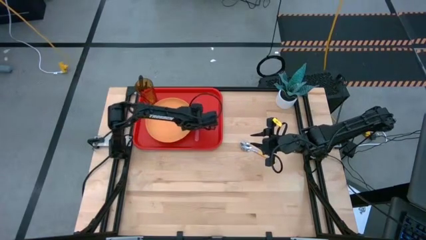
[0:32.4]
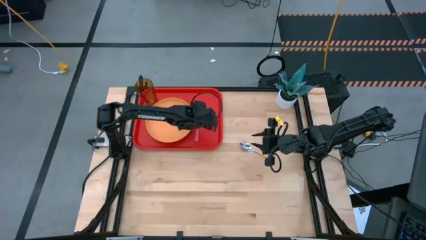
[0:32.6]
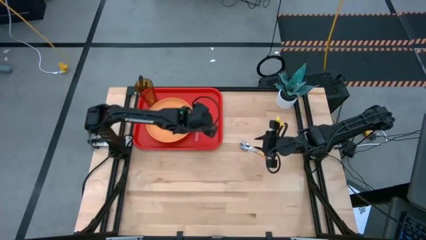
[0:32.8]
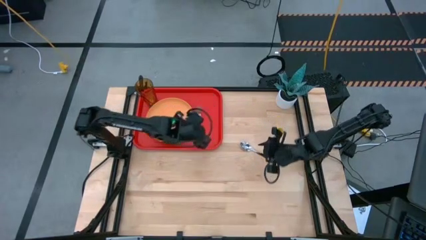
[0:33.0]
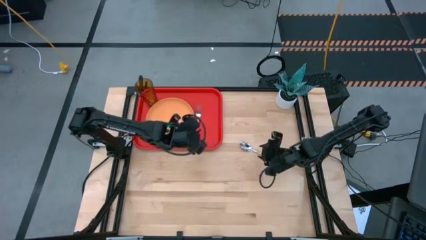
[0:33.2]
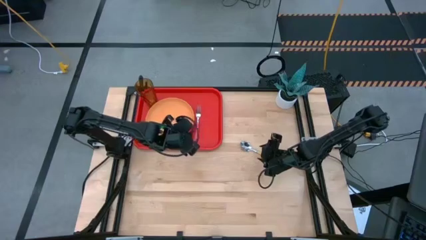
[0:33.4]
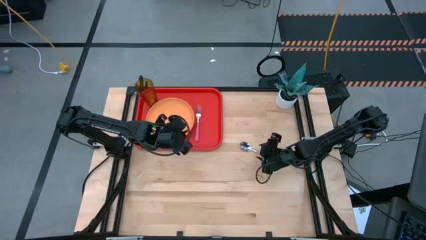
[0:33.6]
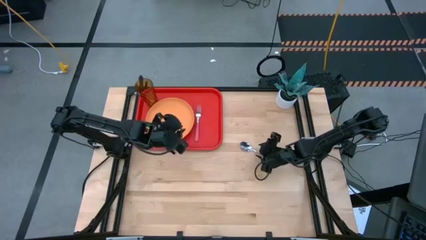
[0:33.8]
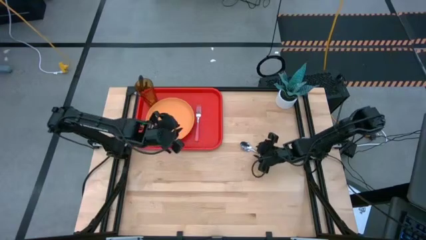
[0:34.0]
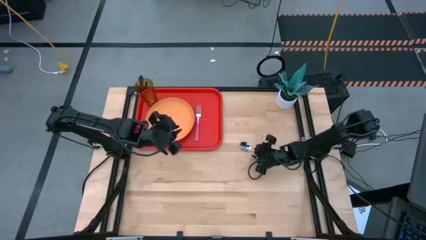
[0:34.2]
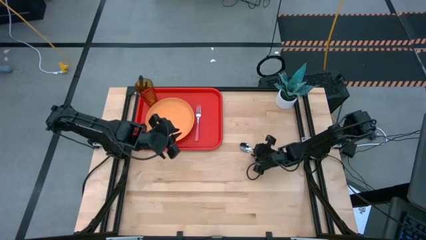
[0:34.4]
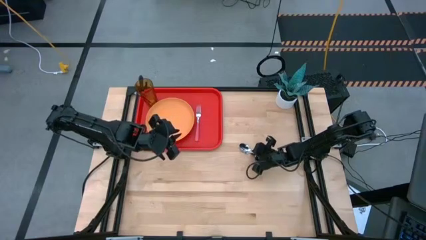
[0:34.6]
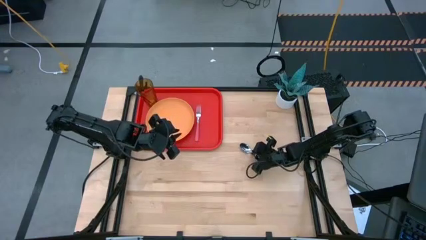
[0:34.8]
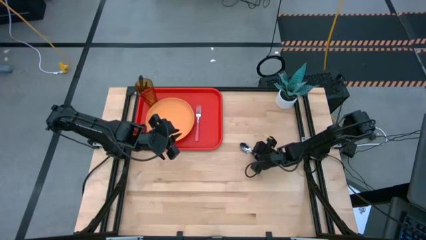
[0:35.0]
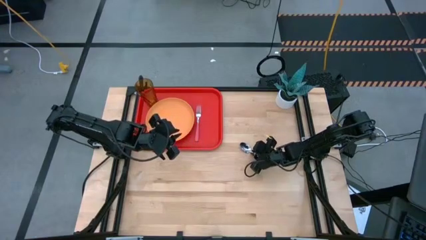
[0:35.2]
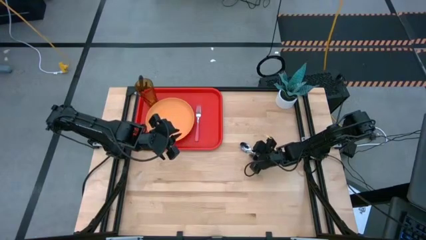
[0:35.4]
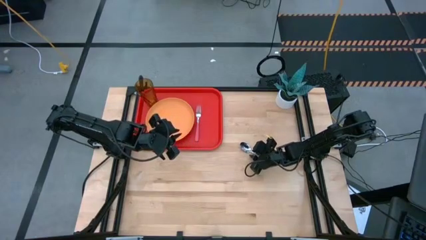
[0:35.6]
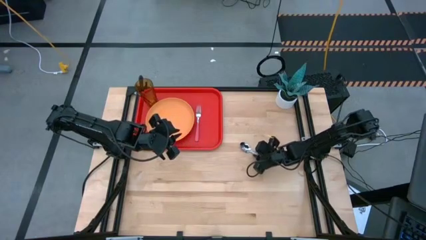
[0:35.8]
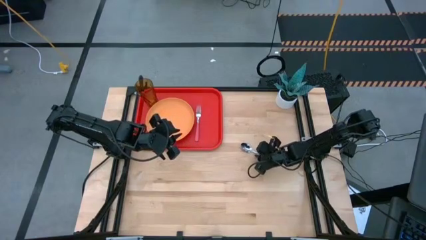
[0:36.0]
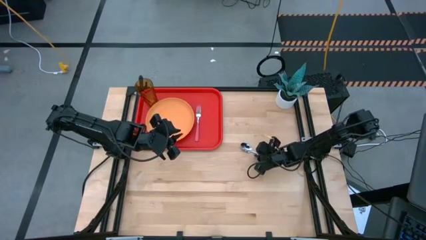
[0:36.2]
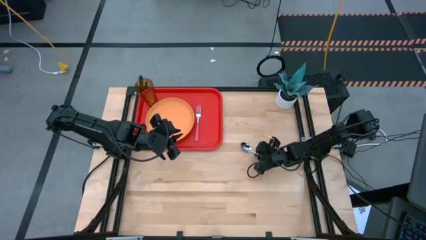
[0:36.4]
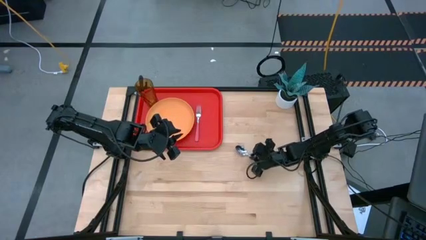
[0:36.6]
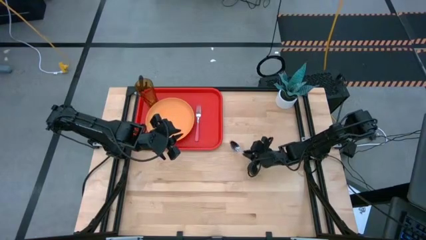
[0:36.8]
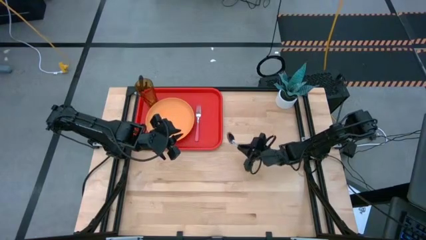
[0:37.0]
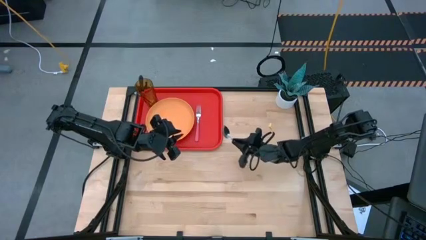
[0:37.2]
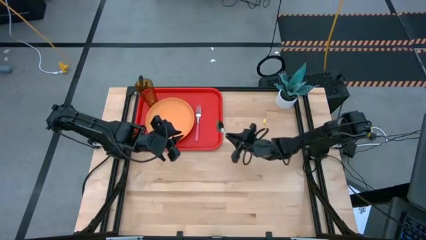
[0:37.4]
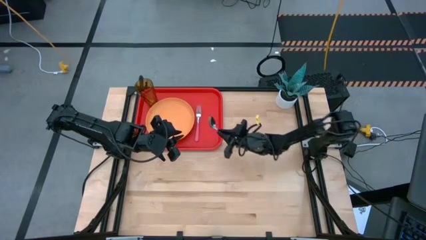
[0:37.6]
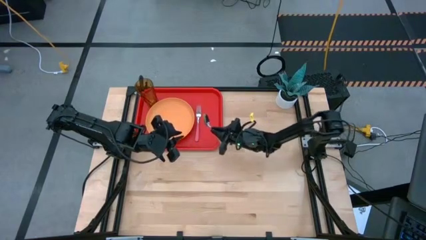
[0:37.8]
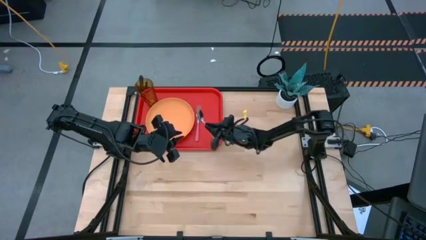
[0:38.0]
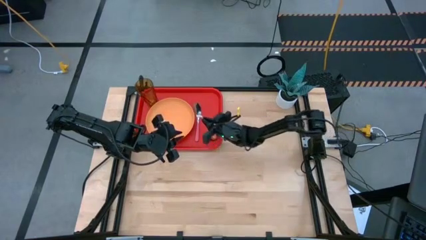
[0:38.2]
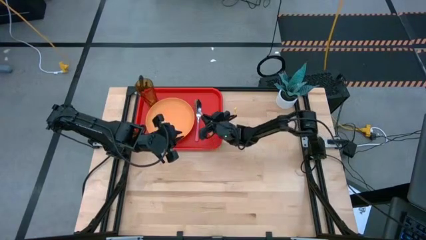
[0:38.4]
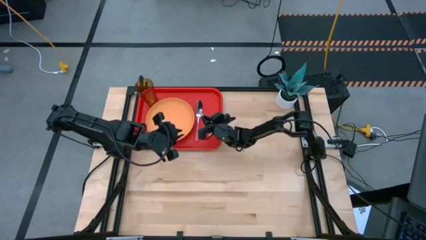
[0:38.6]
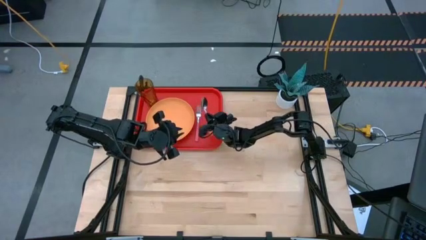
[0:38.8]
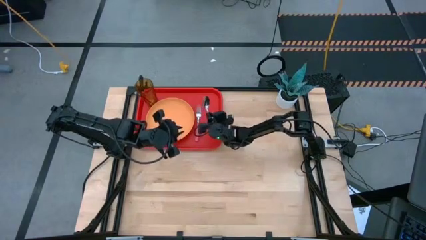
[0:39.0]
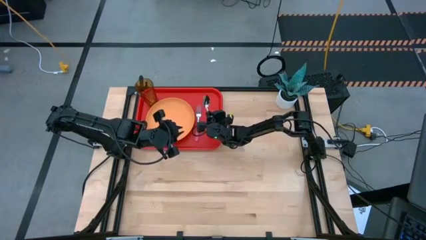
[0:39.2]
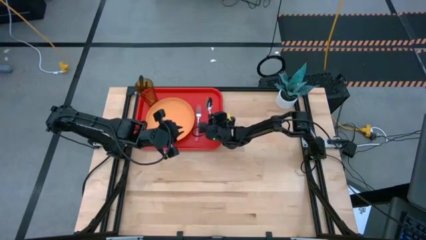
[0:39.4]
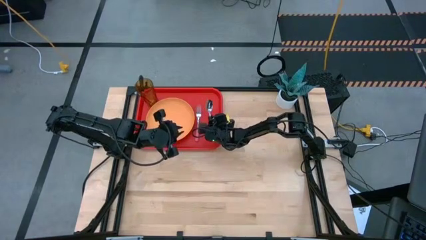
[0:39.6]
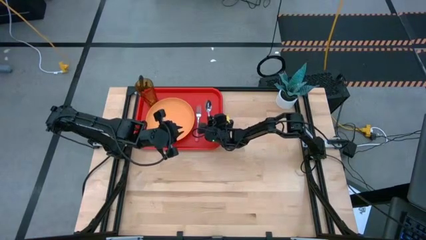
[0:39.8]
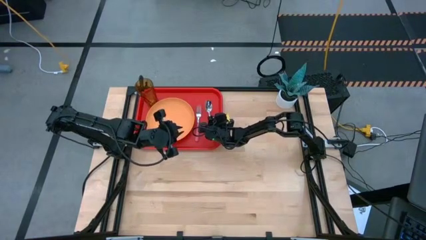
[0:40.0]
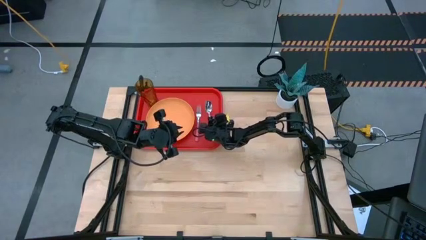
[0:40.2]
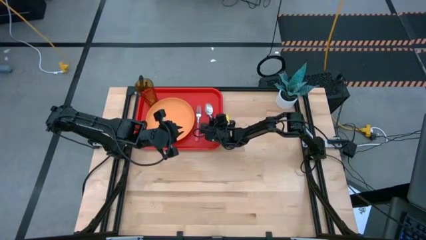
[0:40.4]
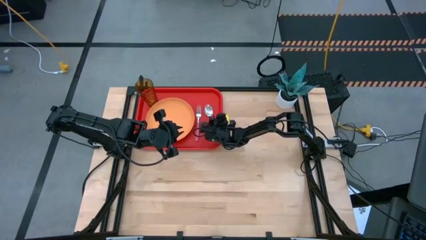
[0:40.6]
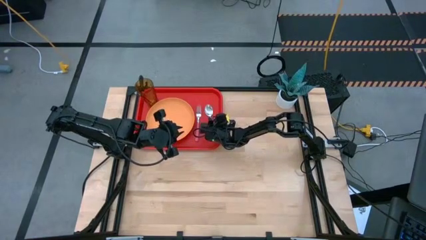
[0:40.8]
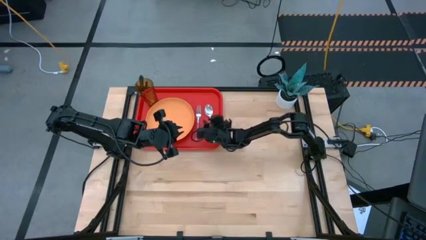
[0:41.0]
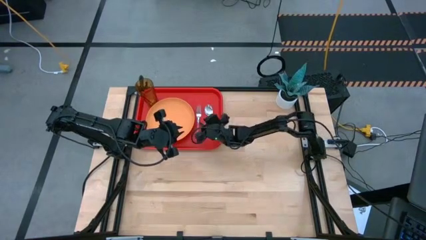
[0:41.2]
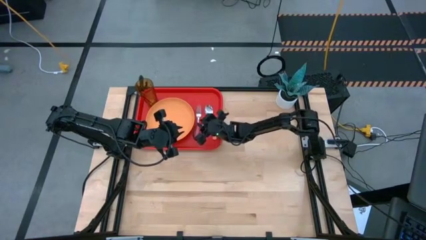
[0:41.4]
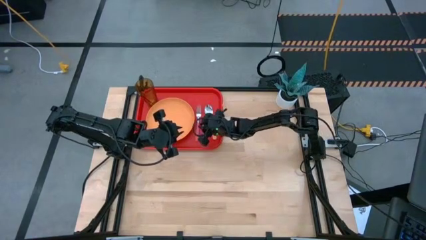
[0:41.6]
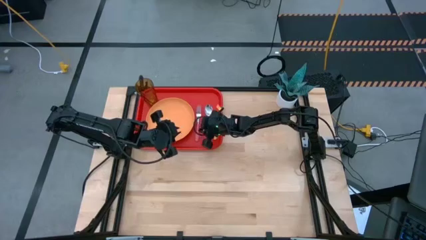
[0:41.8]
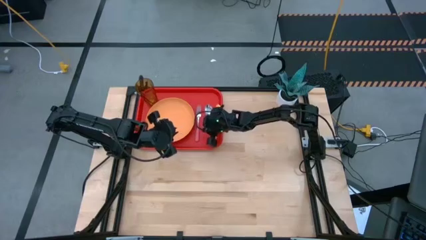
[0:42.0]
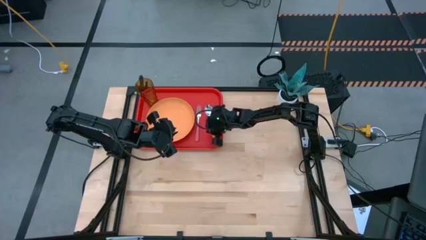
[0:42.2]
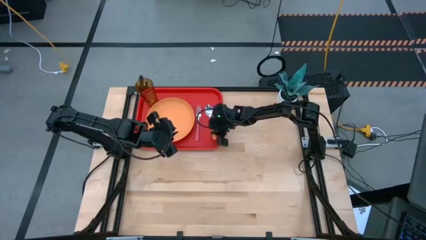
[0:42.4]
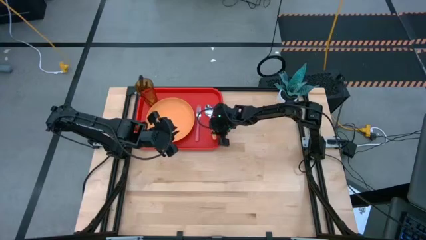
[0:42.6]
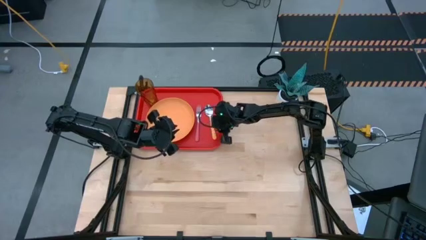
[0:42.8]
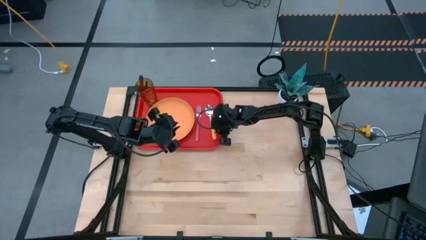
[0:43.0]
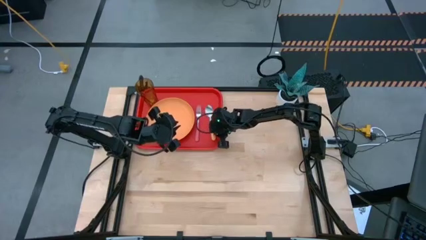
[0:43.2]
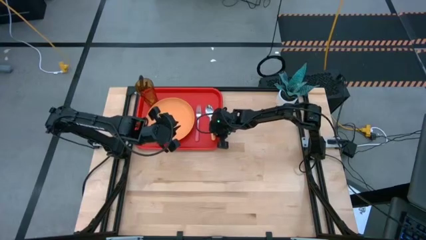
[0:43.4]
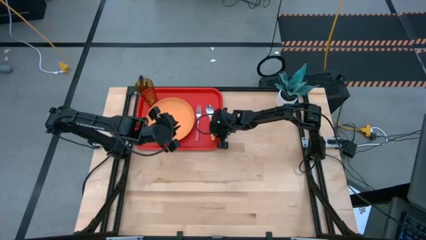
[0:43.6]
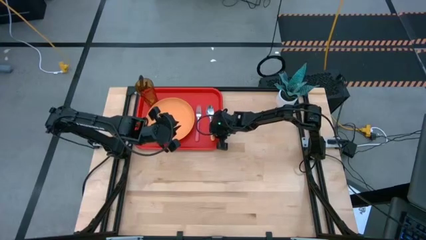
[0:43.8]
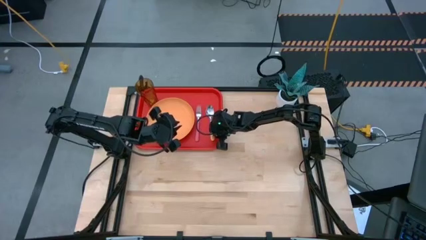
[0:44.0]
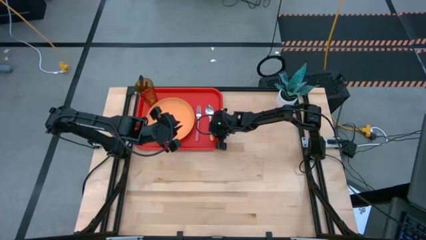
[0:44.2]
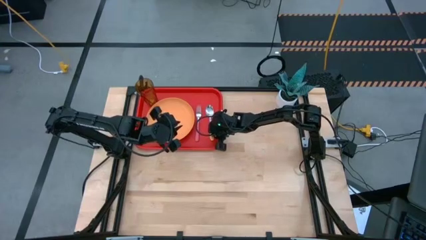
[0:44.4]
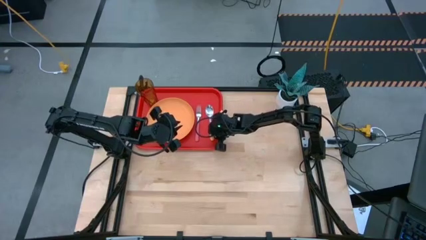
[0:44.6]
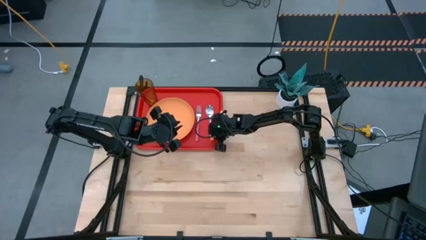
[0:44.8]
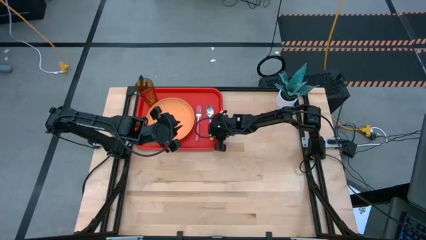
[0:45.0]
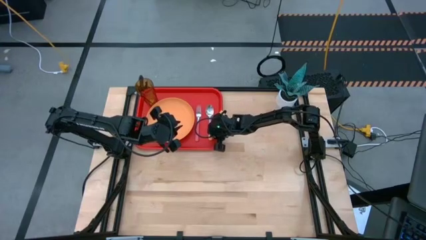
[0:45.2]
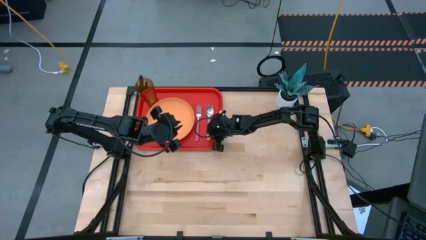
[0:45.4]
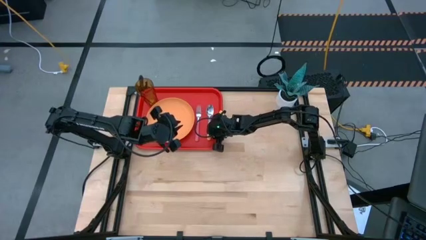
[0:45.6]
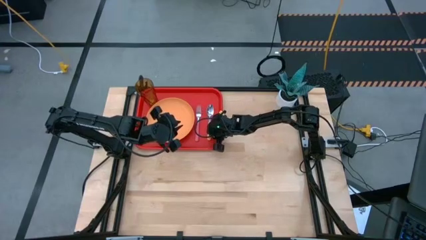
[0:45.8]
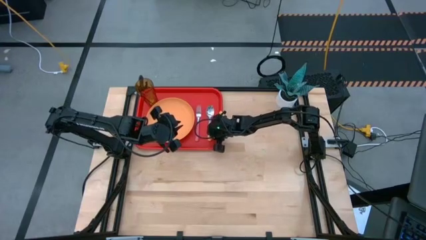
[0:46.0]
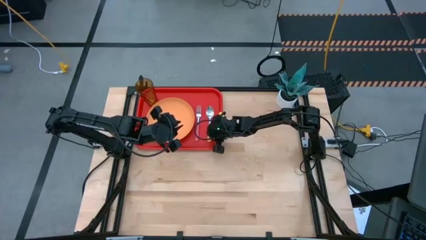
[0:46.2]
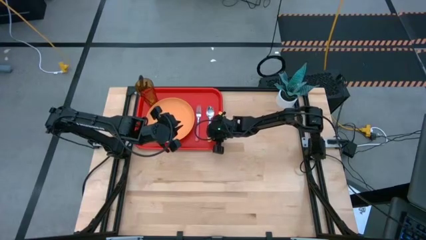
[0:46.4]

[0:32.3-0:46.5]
Task: Pick and place plate/cup/fork/spoon on tray
Put the yellow spoon on the red tray to the right of the pink fork
